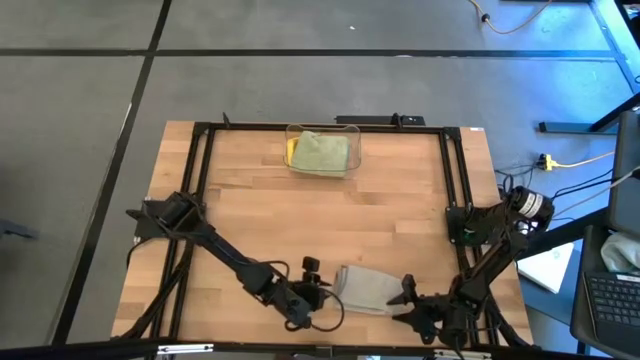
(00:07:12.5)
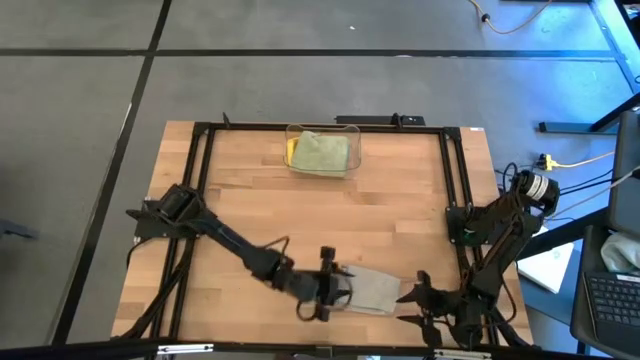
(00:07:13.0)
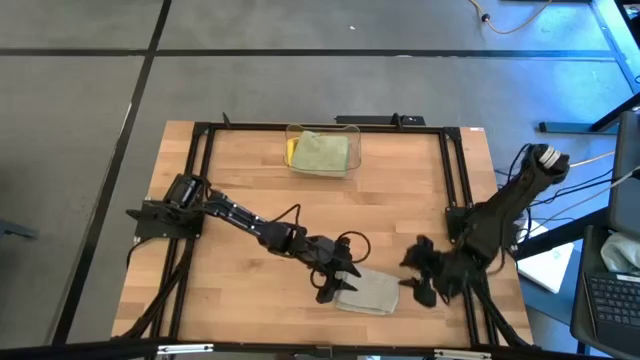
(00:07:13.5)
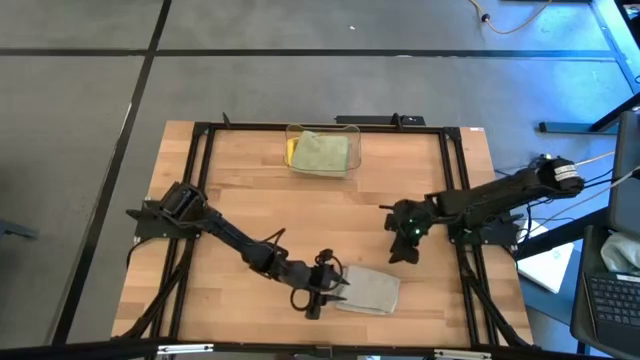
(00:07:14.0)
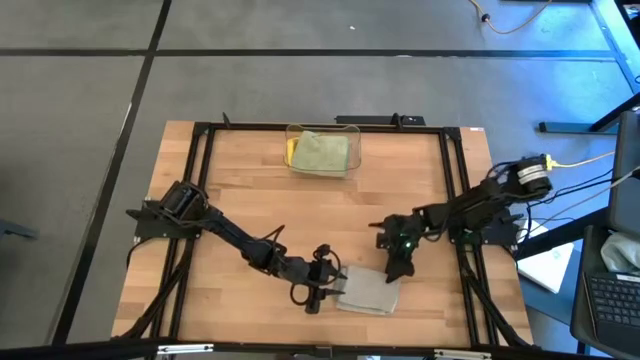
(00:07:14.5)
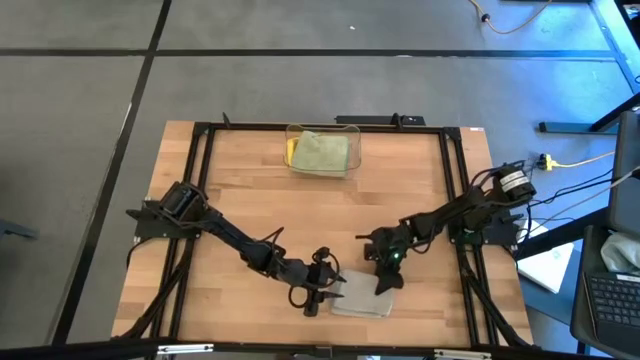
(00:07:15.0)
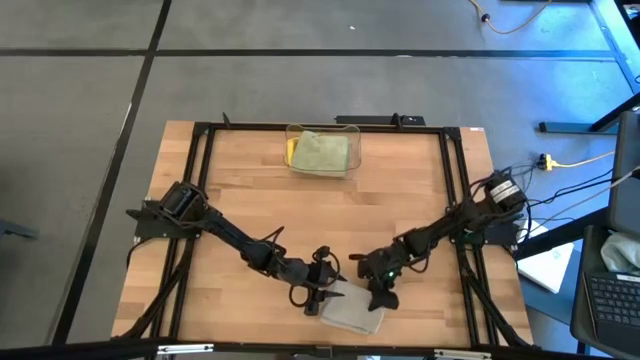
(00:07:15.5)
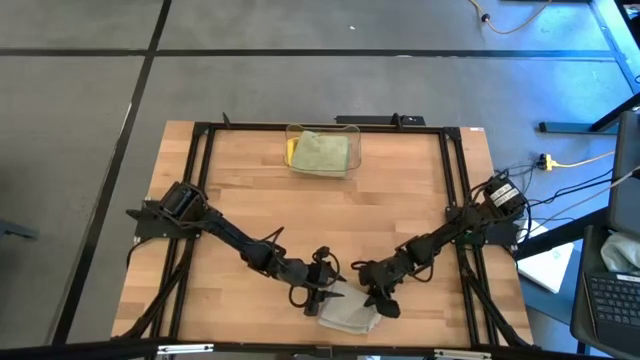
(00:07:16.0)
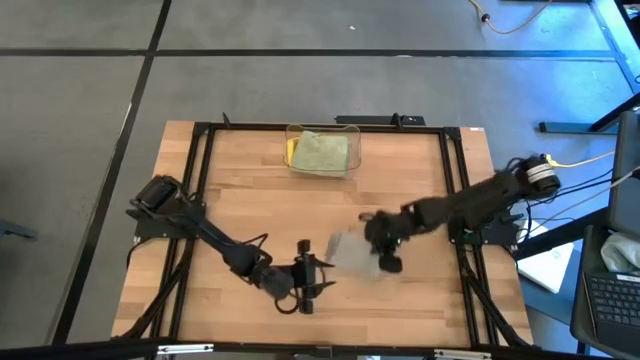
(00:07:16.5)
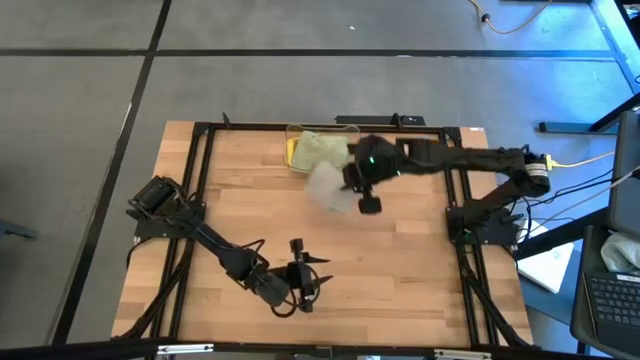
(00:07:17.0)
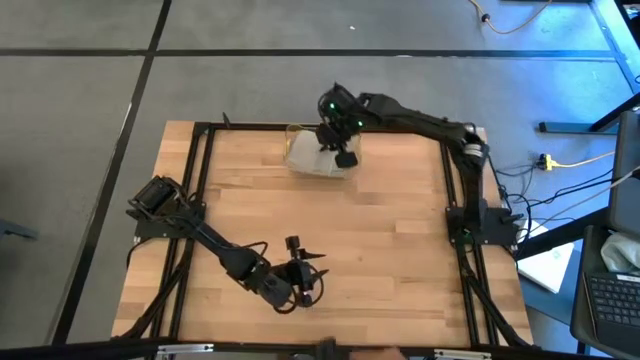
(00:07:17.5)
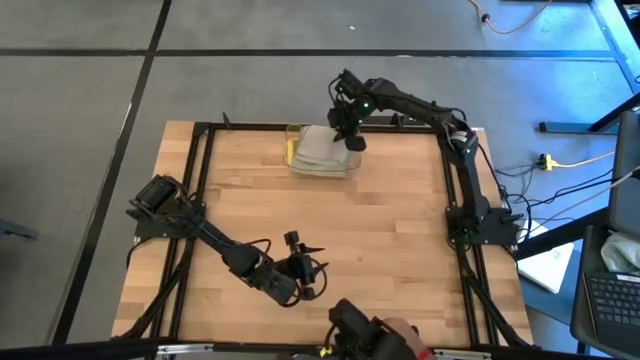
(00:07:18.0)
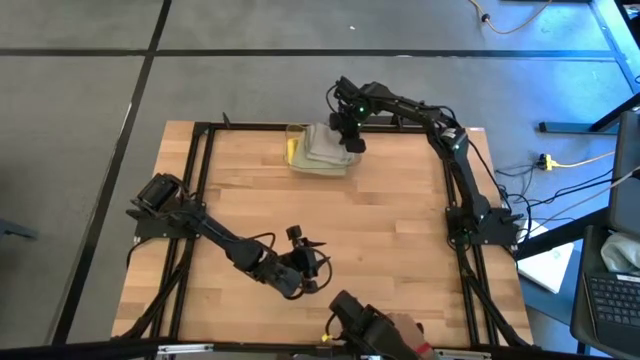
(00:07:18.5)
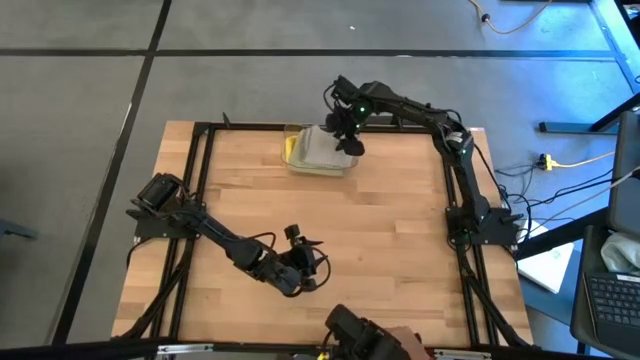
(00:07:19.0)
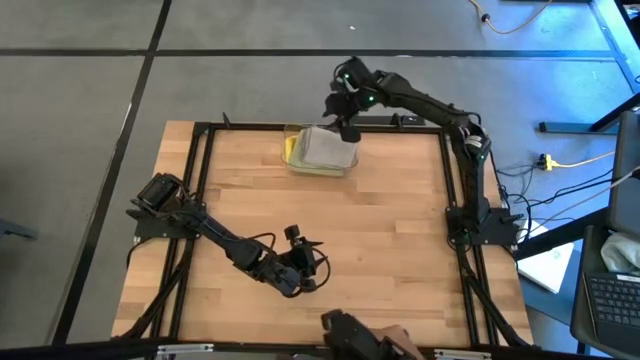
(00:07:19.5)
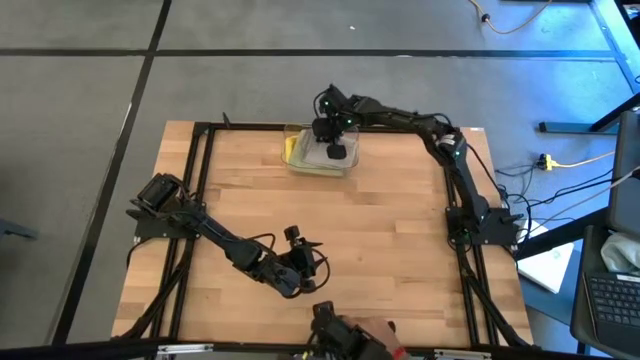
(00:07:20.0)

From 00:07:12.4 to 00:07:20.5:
Task: Fold microfiber towels
Put the gray microfiber cloth into the transparent bin

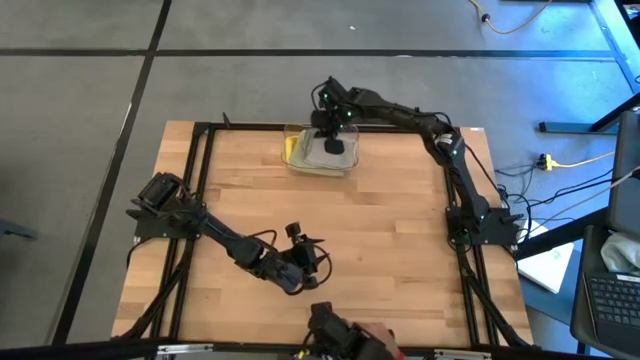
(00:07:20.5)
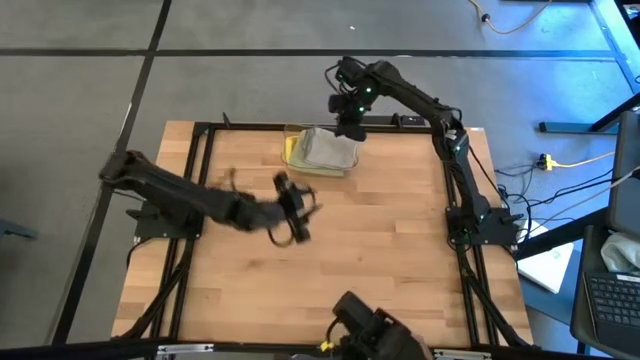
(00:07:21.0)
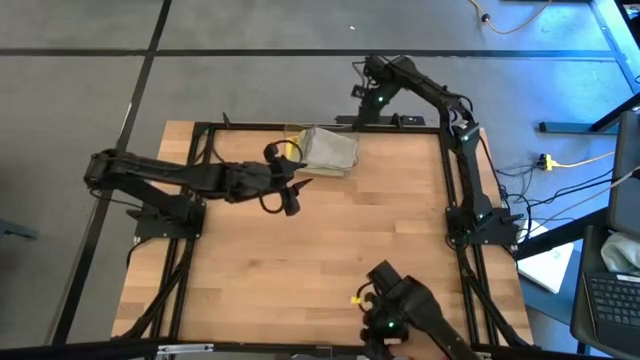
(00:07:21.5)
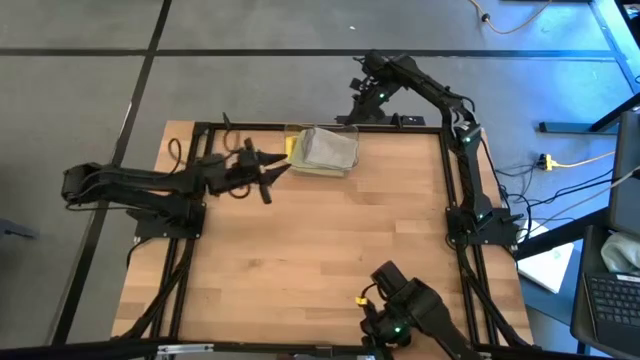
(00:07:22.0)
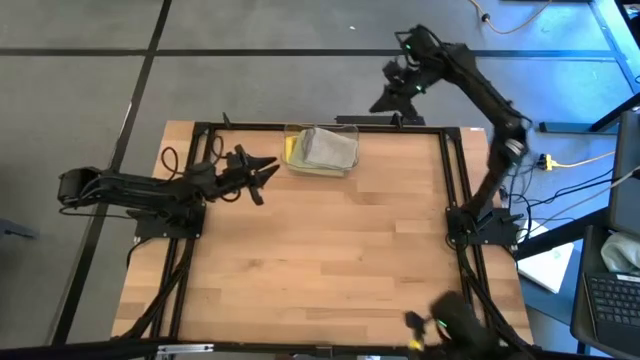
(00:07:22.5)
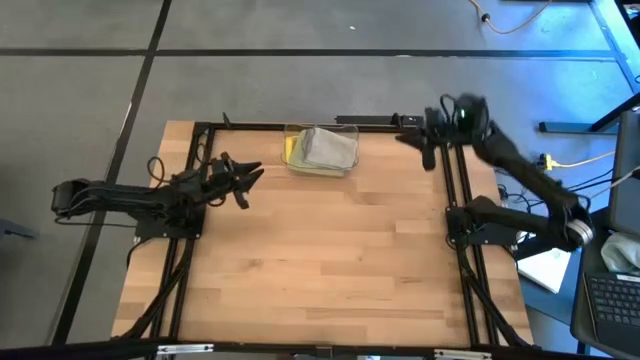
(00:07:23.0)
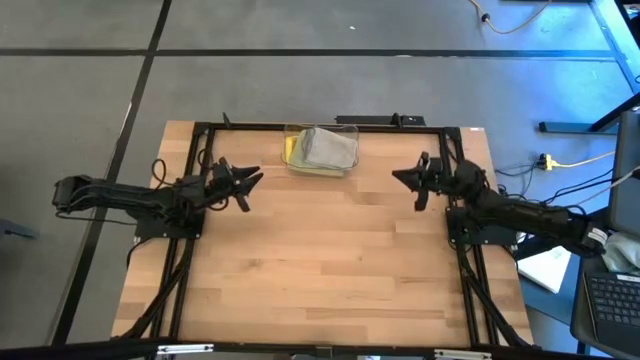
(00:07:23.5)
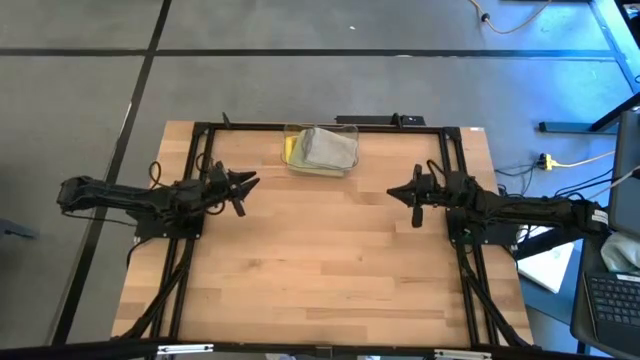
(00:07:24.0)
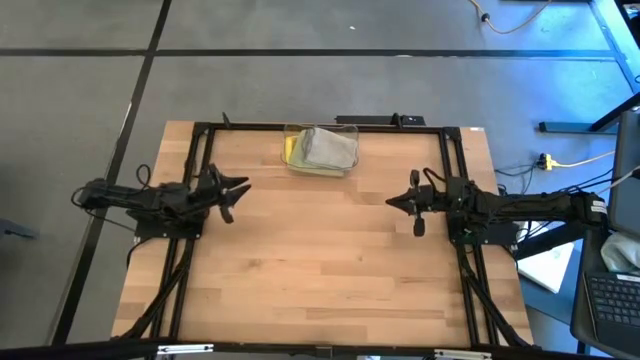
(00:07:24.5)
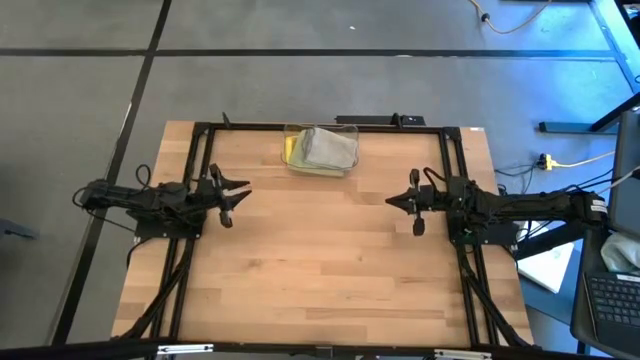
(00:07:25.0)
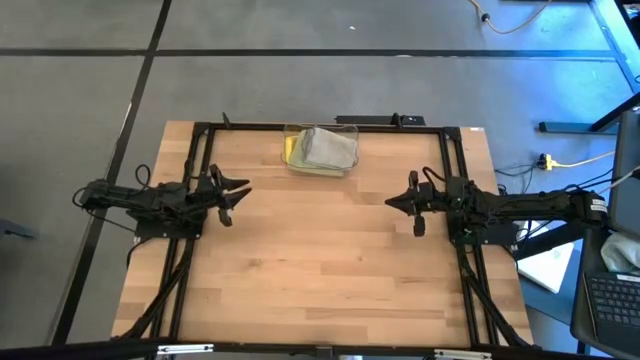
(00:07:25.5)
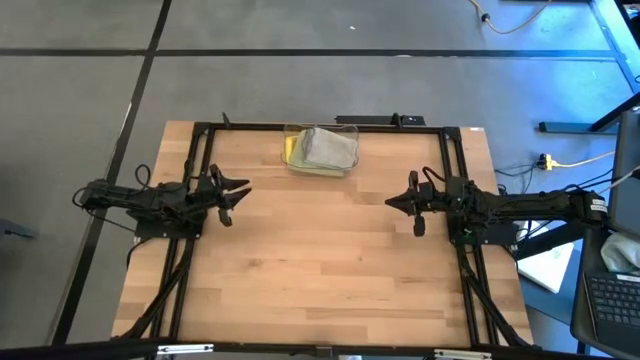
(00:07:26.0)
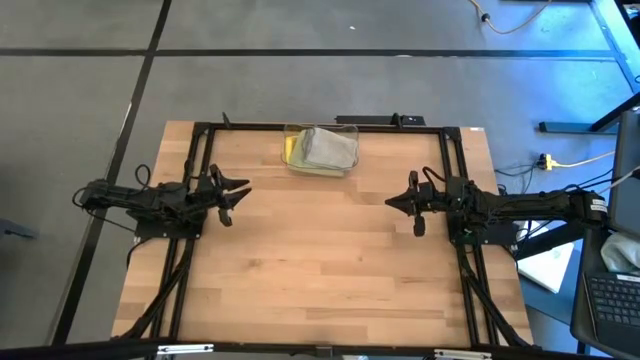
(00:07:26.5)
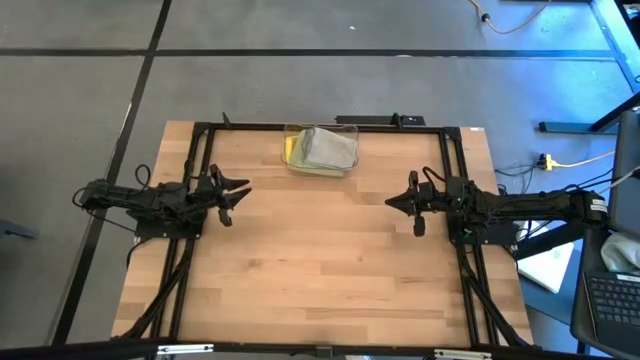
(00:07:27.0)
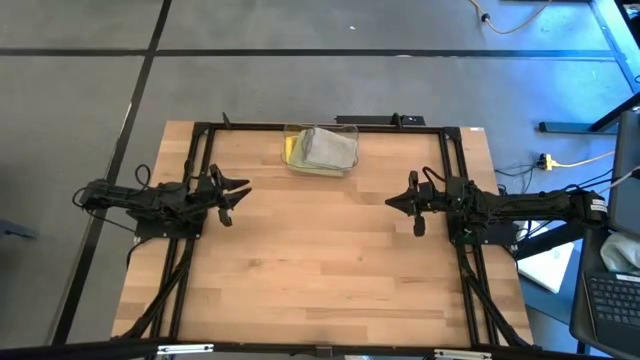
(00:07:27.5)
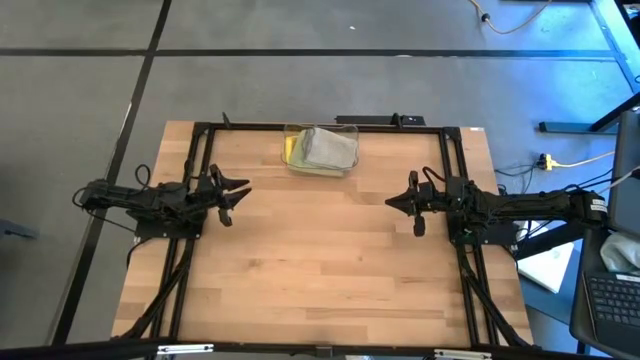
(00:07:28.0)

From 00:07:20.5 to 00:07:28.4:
Return to Home Position

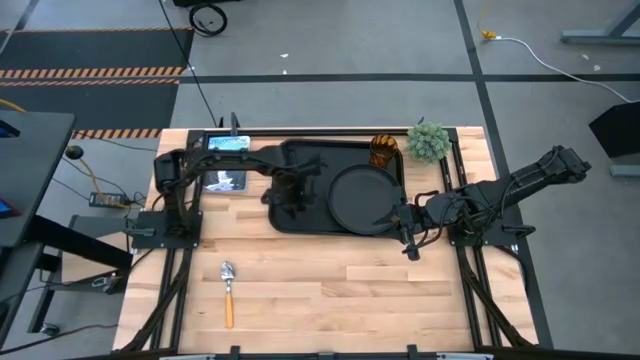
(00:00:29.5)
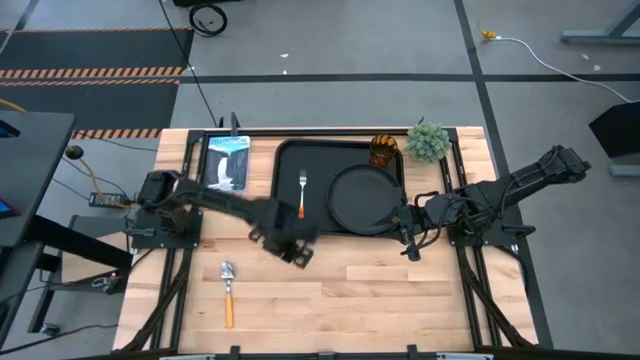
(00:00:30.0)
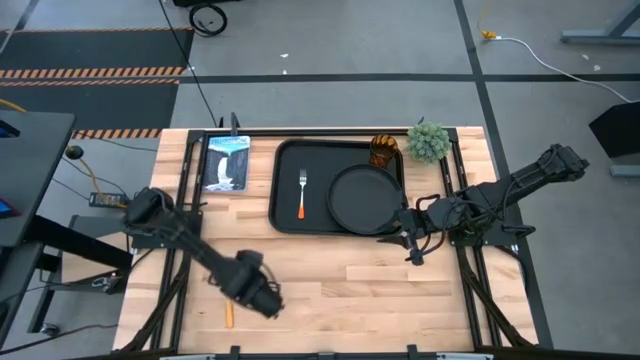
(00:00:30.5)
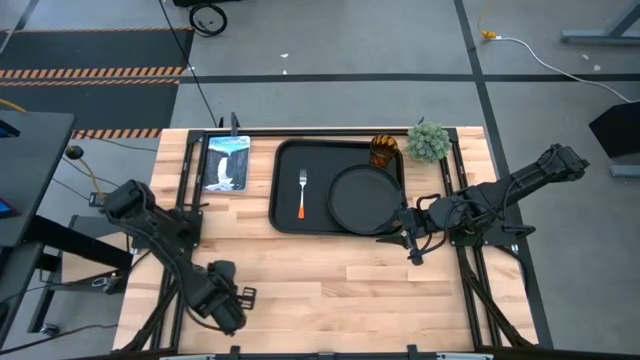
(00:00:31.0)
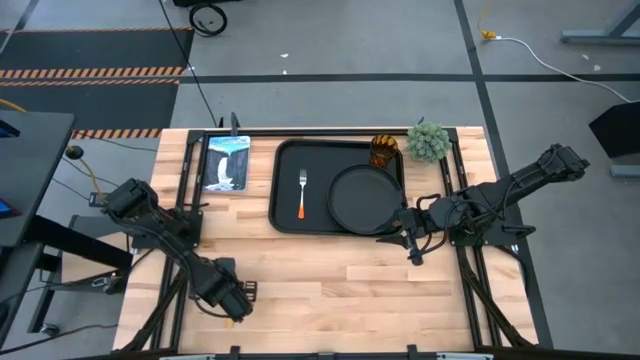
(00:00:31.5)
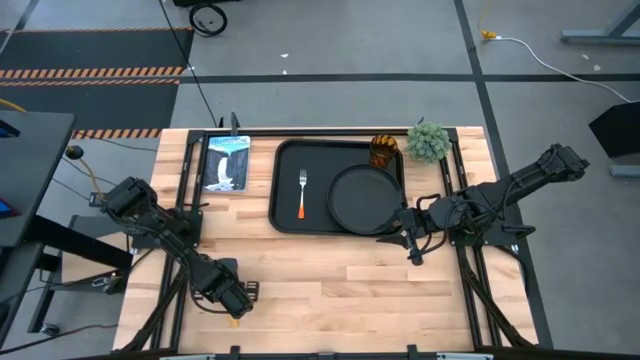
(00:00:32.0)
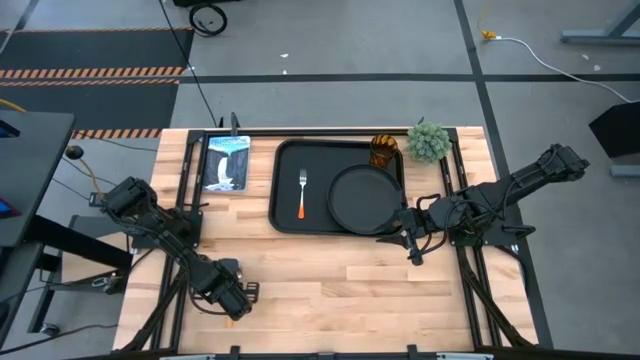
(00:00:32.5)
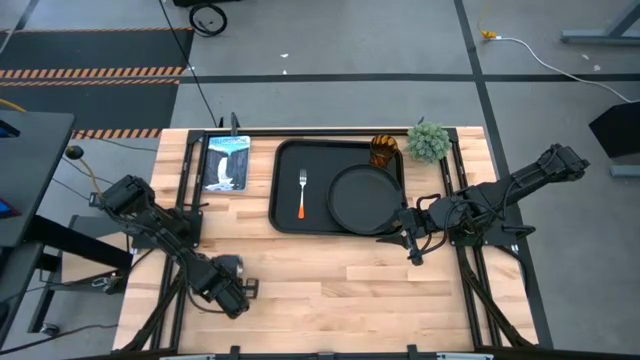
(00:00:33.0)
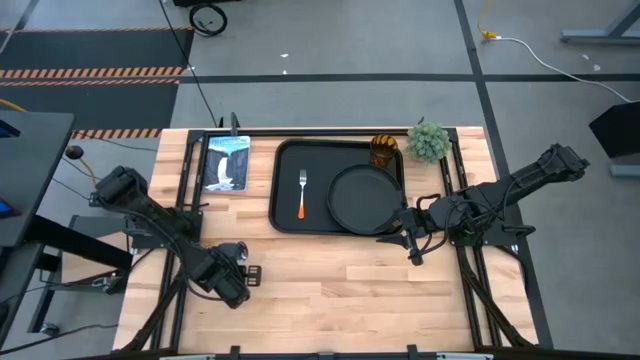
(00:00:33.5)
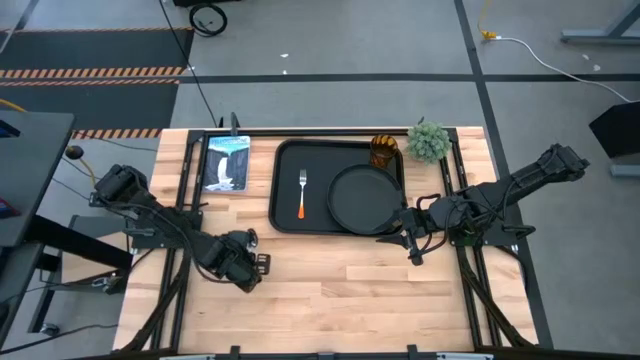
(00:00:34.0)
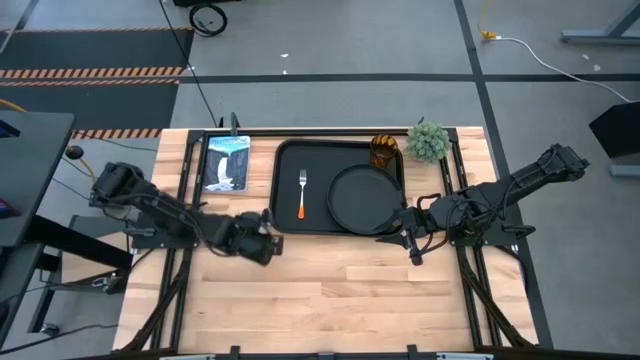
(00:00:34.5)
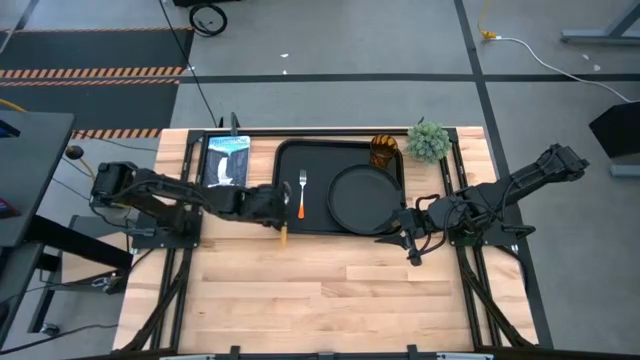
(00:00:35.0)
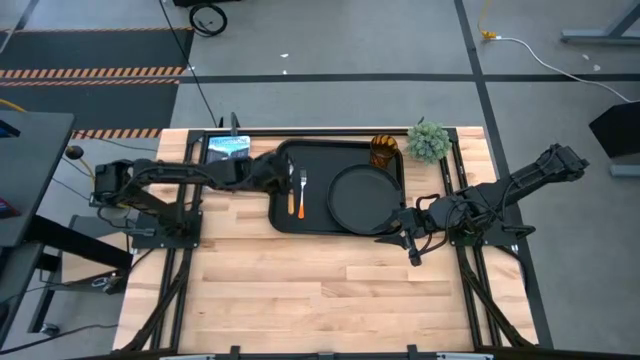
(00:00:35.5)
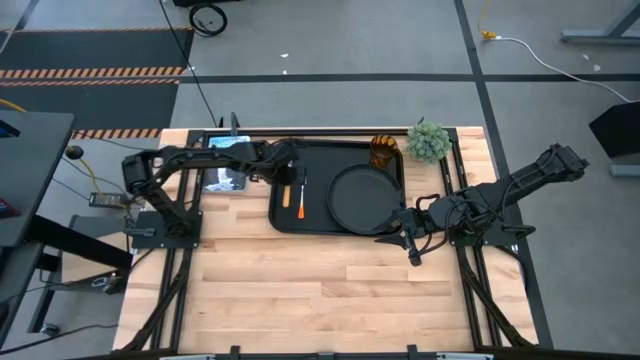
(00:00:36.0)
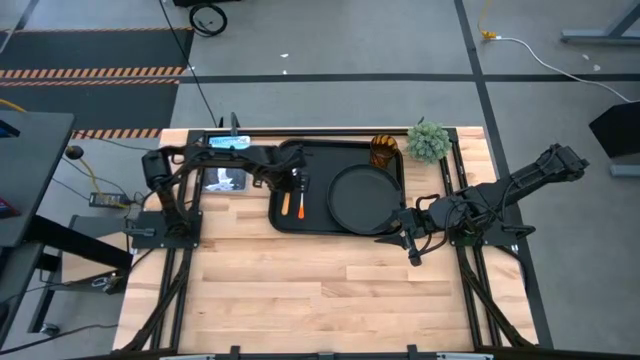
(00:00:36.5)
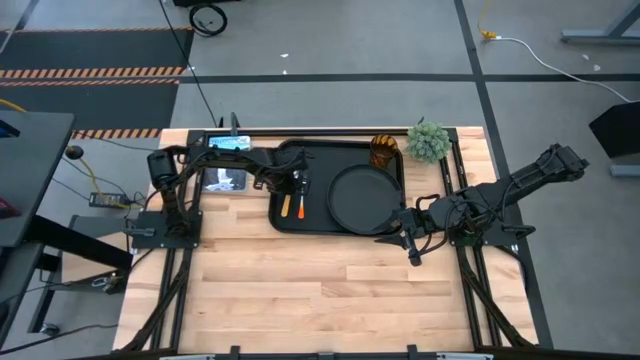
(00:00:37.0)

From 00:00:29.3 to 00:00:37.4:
Task: Pick and place plate/cup/fork/spoon on tray
Put the yellow spoon on the black tray to the left side of the orange fork
